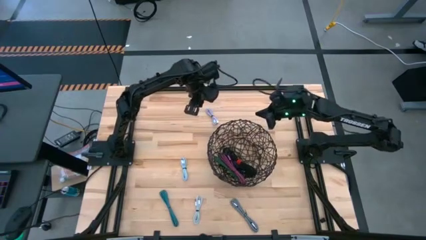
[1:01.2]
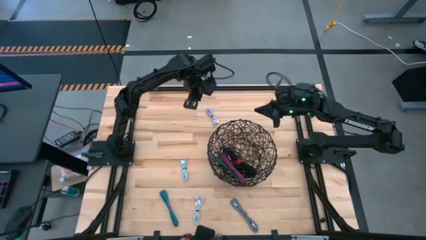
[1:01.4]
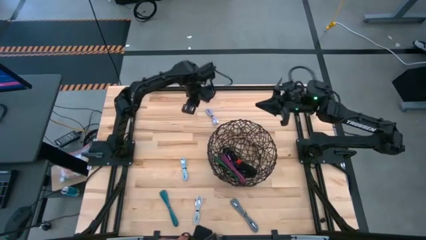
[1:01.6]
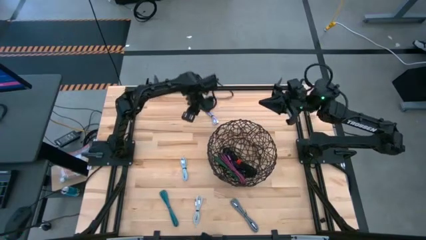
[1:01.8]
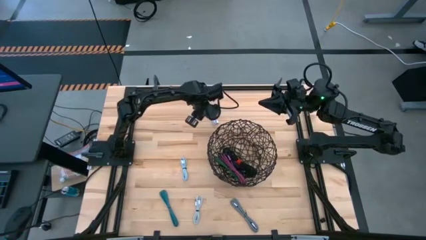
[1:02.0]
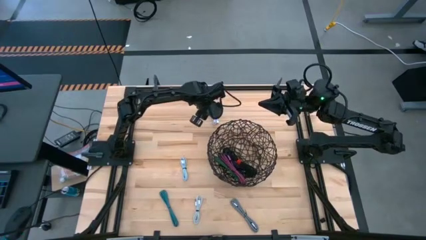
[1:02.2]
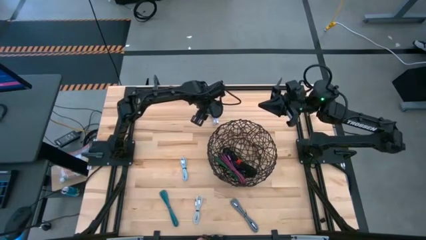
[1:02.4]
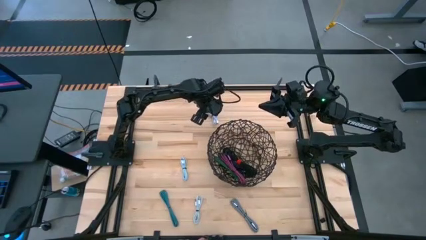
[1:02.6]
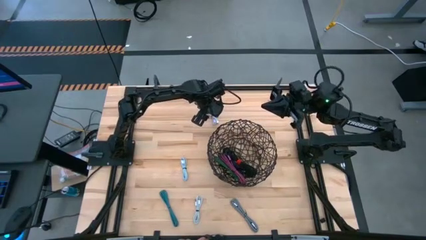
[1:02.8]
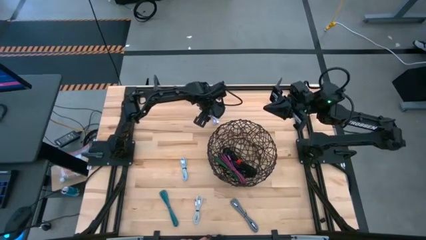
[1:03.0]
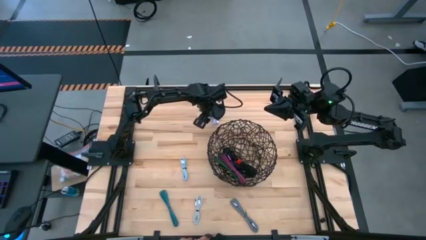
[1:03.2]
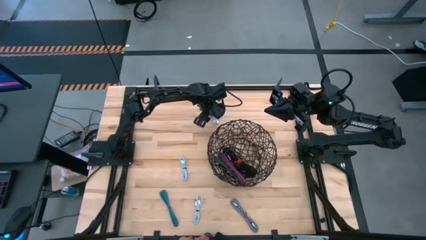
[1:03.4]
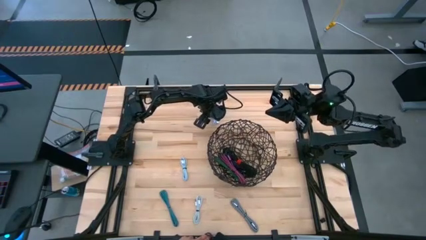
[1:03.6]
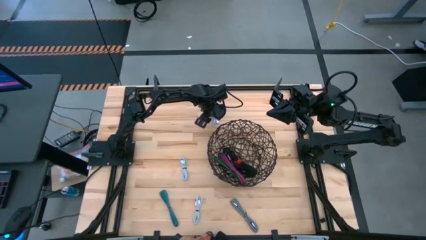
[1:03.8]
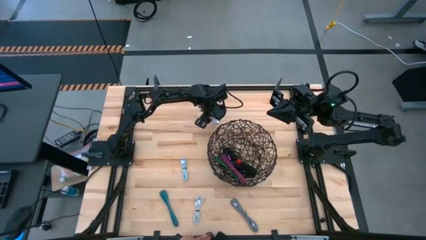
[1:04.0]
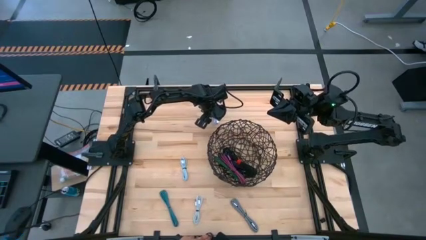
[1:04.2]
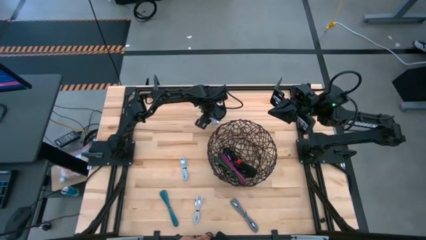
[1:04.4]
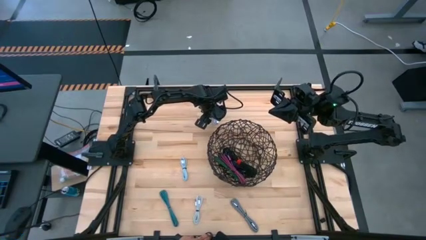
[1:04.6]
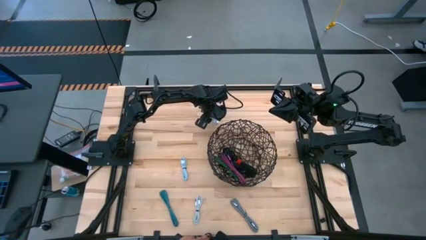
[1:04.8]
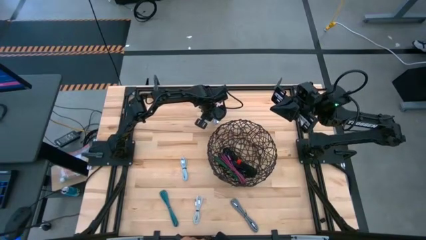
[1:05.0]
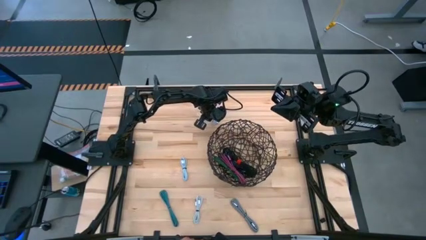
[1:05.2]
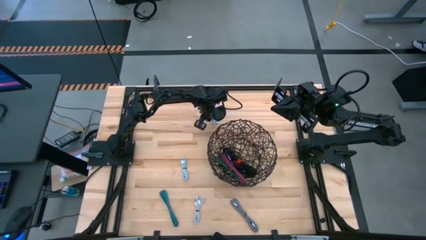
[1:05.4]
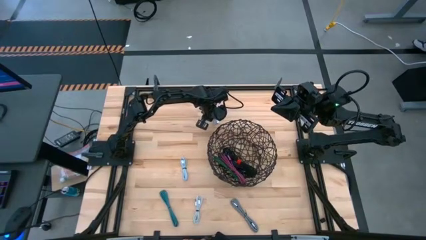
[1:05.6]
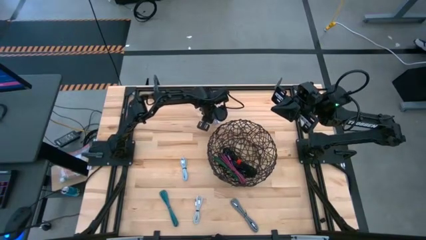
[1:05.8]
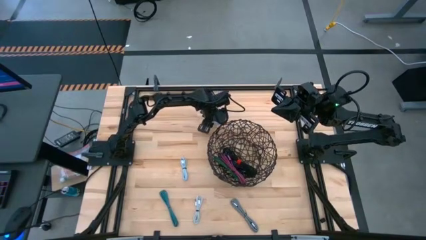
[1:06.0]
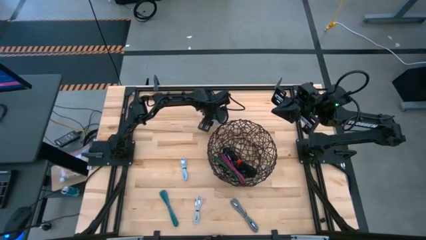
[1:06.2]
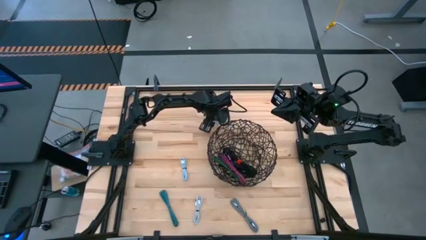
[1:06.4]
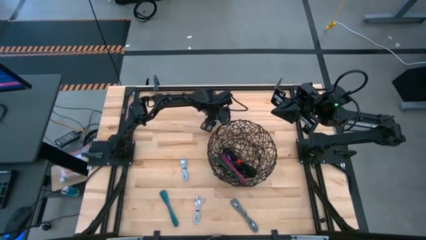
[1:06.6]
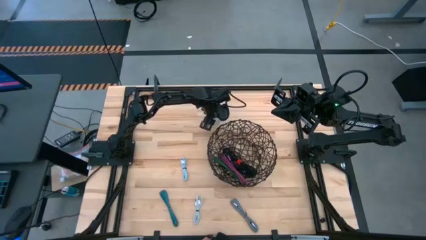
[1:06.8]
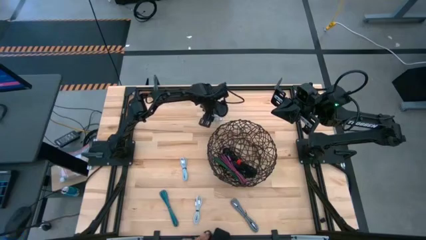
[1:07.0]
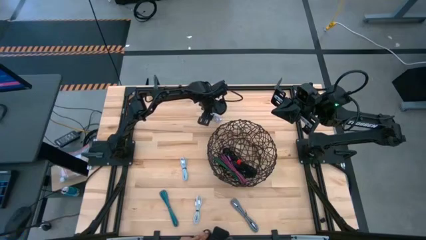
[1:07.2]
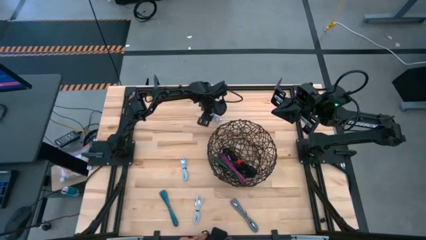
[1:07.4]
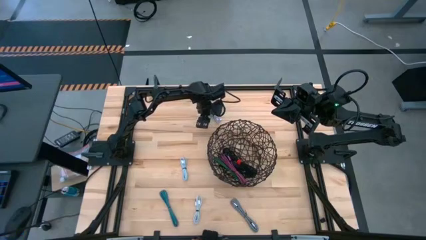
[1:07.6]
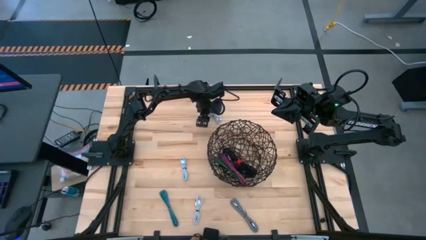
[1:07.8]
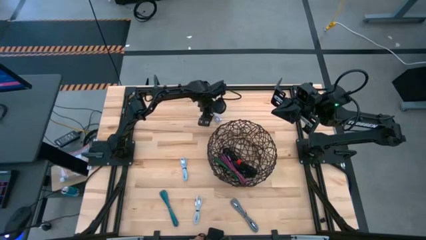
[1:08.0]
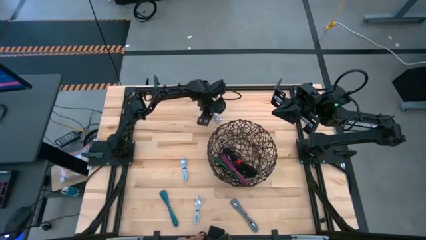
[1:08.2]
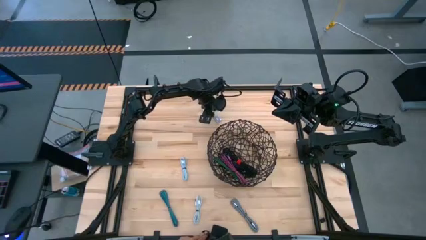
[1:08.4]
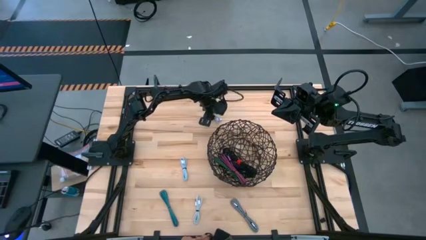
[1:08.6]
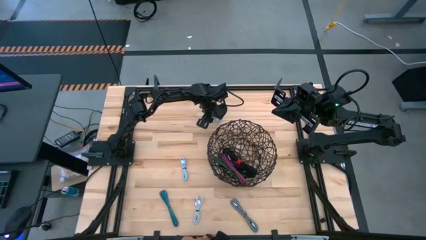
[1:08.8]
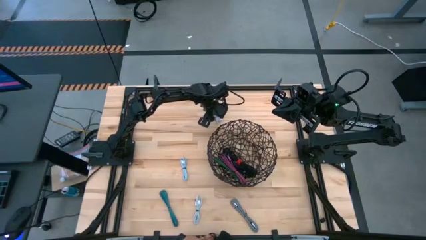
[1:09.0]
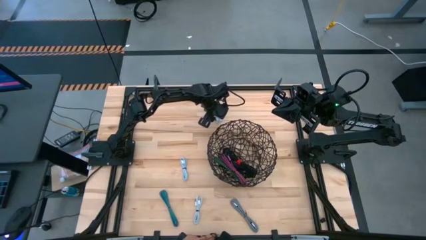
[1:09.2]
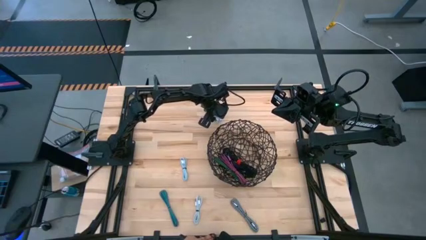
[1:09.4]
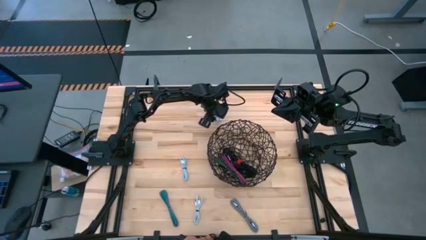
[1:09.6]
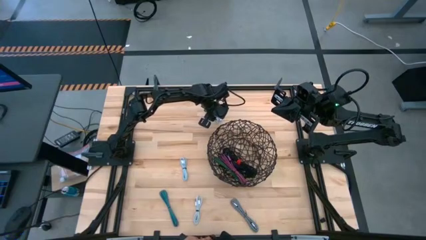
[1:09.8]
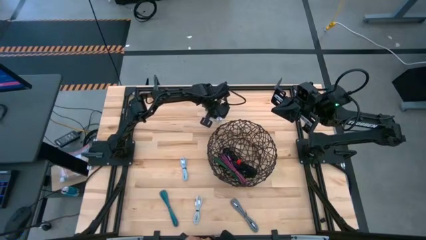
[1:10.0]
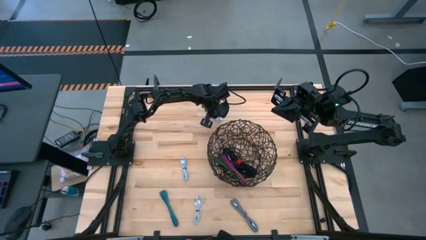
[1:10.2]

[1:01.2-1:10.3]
Task: Pick and place USB-C Cables
Put the purple charger cable into the black wire basket

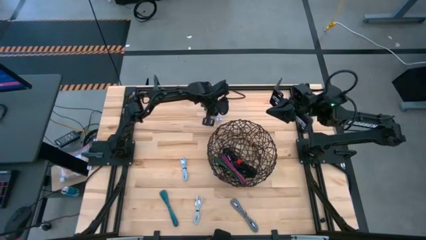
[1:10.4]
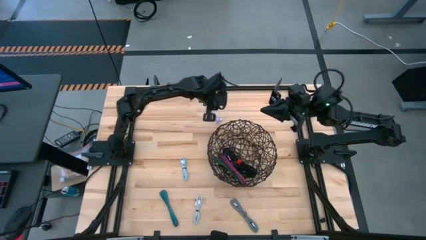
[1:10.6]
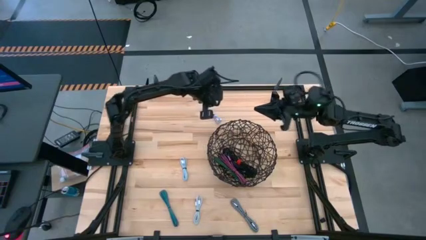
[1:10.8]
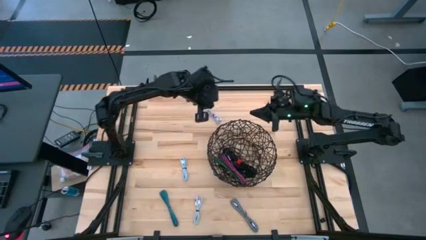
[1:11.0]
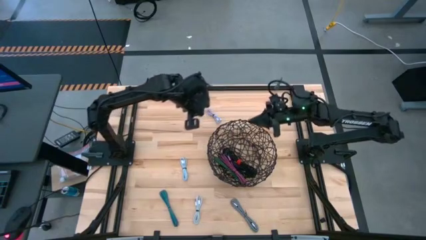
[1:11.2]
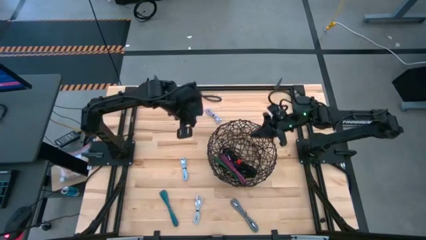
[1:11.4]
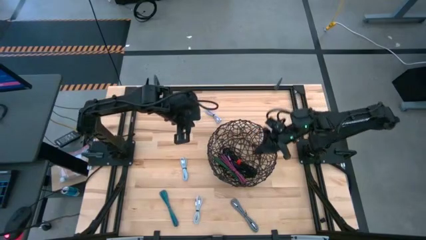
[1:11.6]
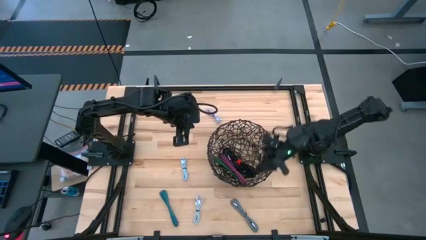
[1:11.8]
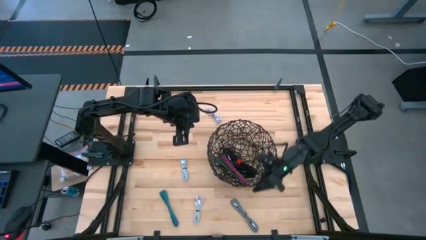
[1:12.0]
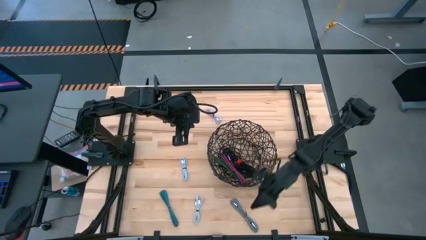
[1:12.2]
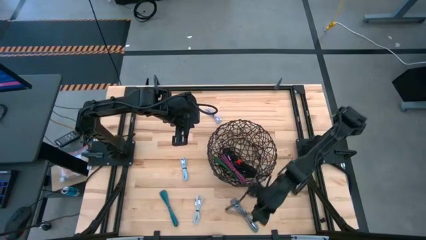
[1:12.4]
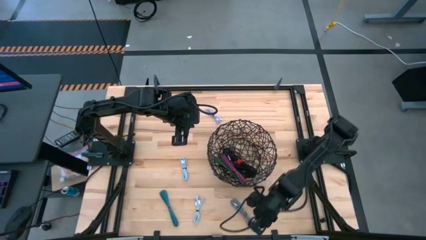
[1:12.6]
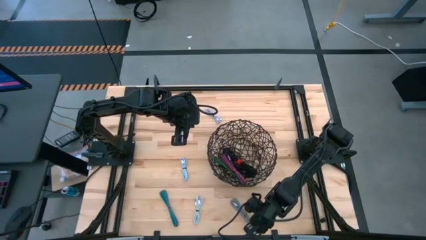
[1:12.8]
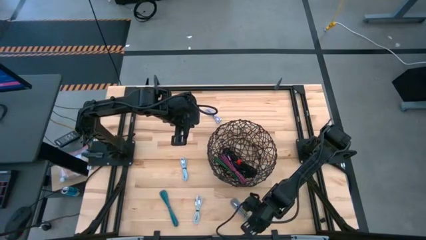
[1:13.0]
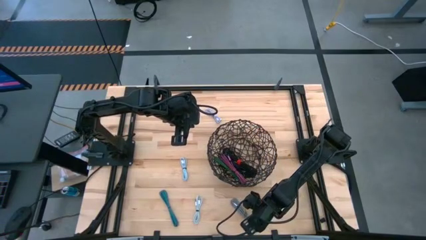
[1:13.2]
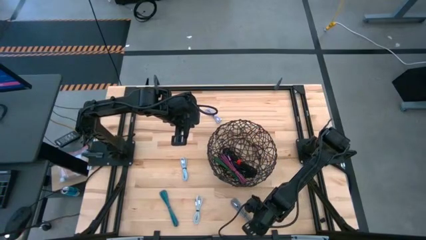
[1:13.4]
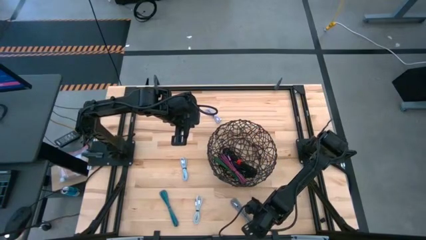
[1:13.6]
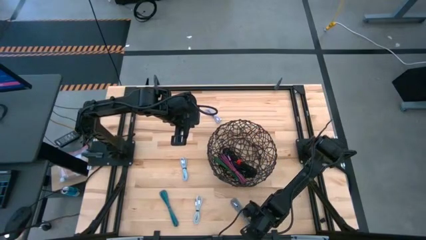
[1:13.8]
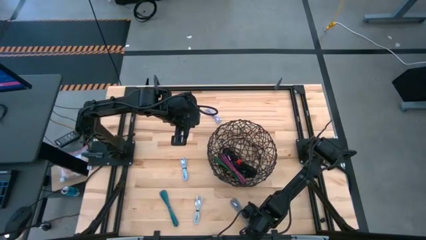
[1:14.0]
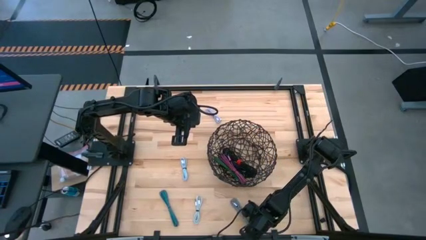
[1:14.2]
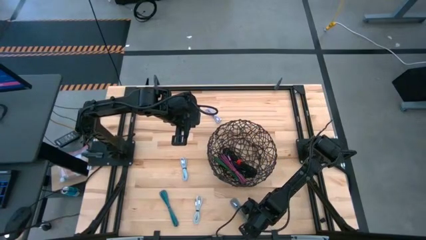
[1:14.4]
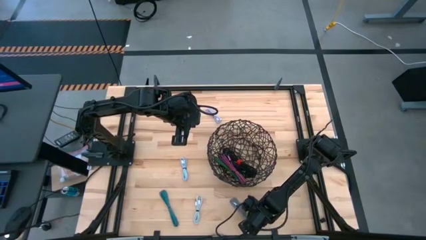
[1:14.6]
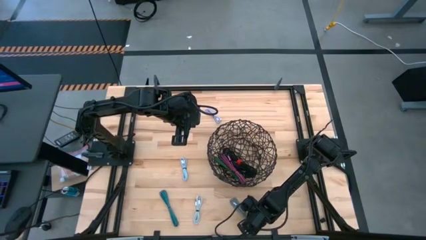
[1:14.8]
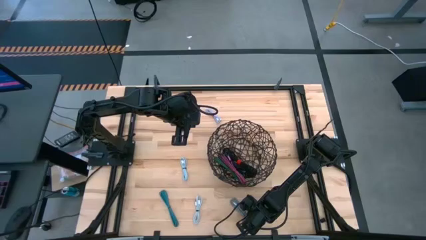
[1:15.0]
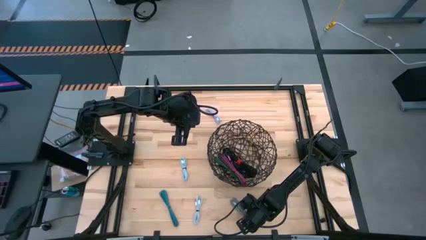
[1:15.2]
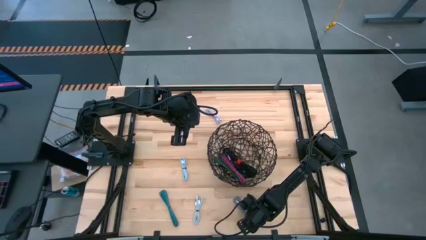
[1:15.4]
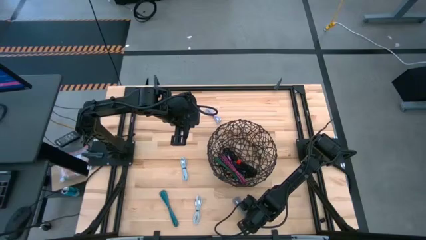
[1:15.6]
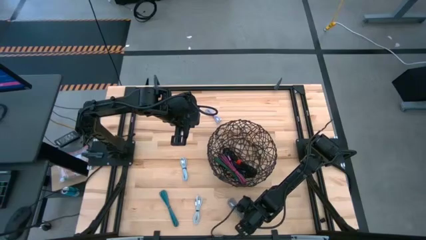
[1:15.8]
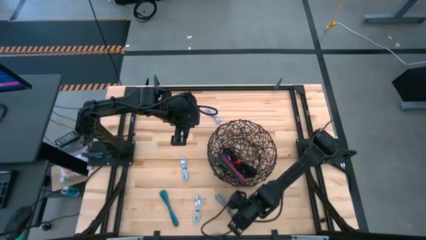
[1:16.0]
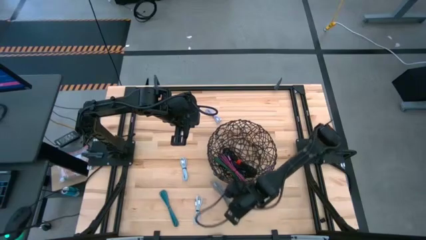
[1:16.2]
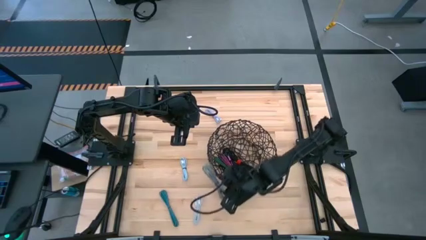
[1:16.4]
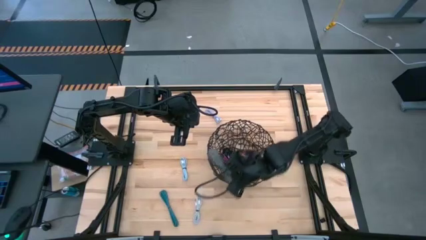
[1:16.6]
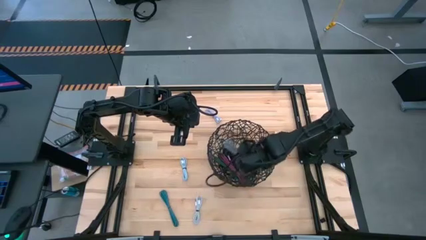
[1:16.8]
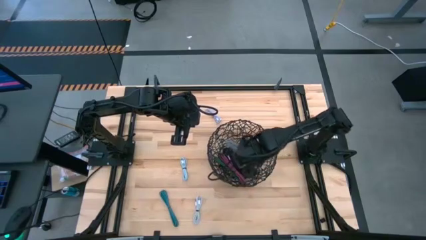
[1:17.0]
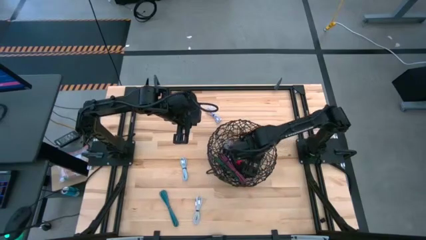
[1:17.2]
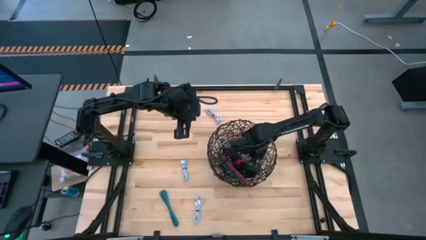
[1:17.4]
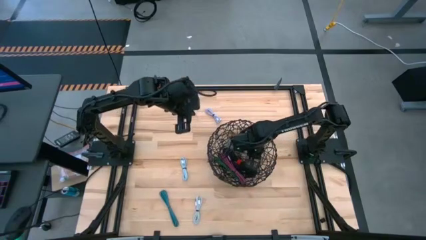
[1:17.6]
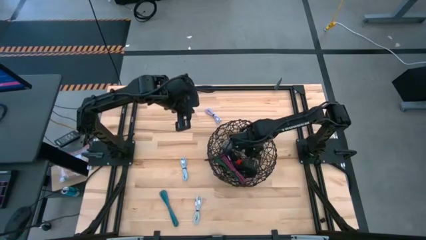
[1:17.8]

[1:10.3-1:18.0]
Put the black white charger cable into the black wire basket
